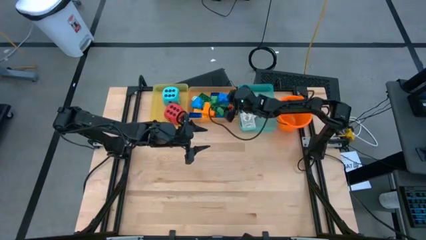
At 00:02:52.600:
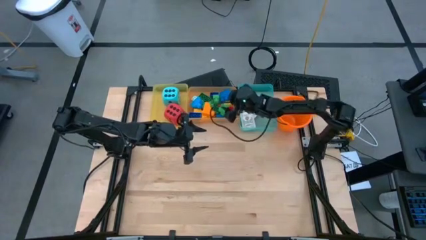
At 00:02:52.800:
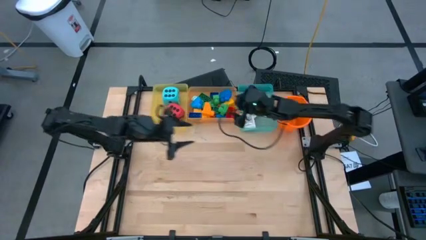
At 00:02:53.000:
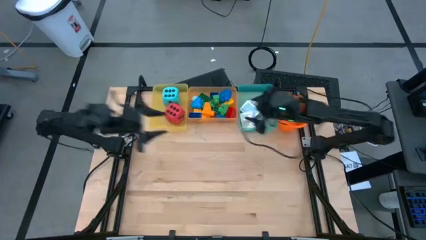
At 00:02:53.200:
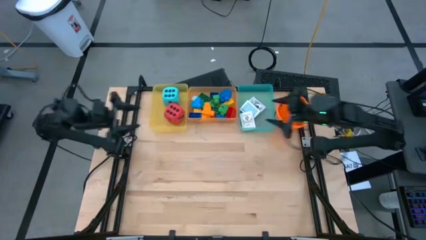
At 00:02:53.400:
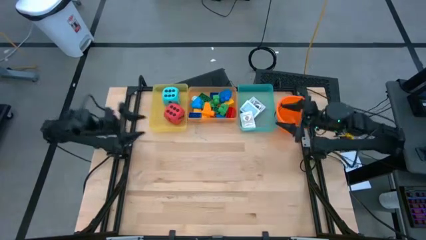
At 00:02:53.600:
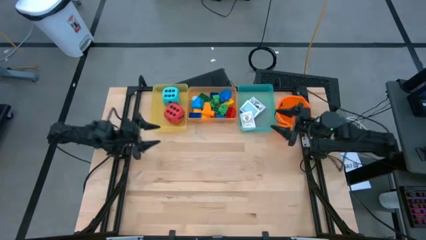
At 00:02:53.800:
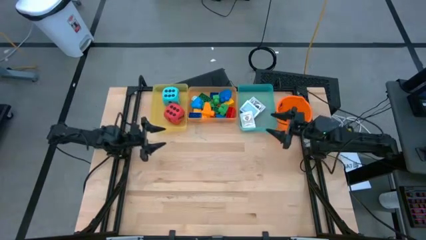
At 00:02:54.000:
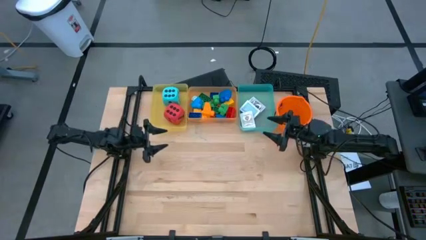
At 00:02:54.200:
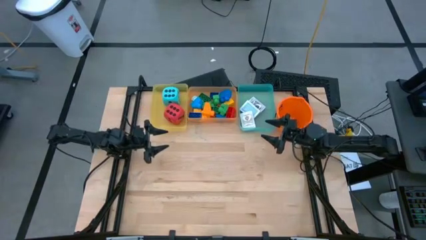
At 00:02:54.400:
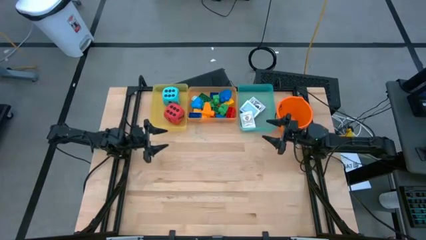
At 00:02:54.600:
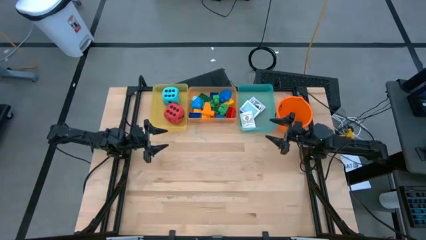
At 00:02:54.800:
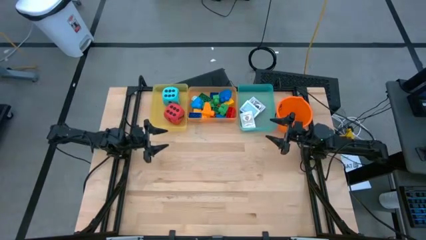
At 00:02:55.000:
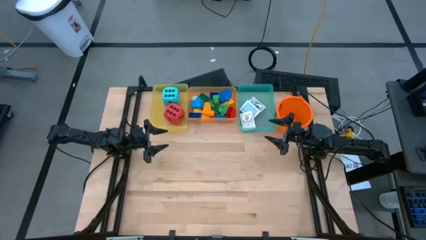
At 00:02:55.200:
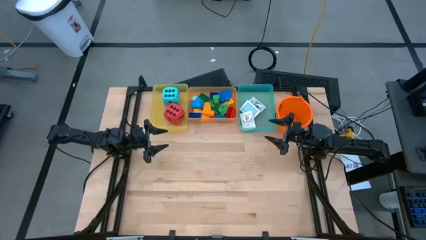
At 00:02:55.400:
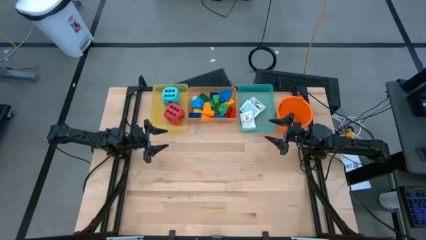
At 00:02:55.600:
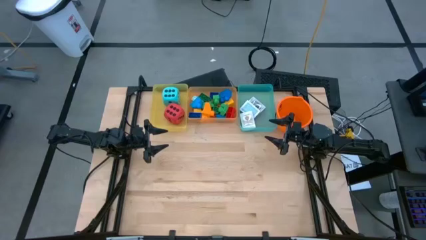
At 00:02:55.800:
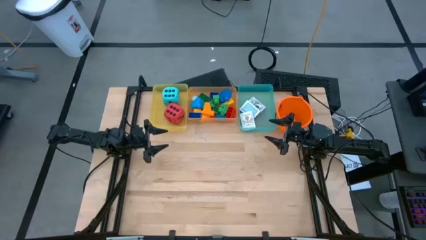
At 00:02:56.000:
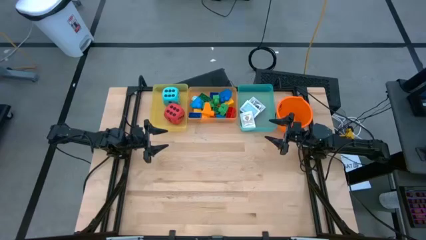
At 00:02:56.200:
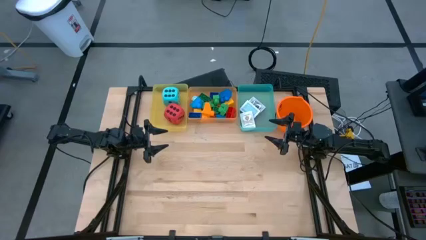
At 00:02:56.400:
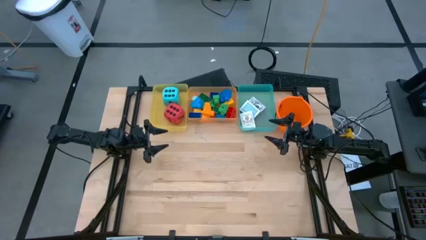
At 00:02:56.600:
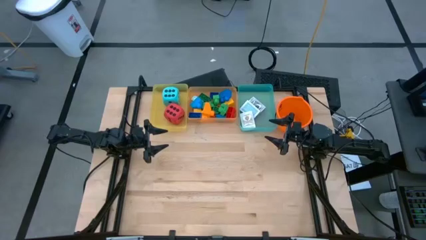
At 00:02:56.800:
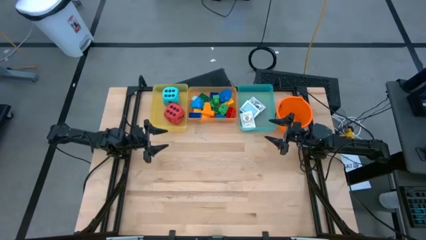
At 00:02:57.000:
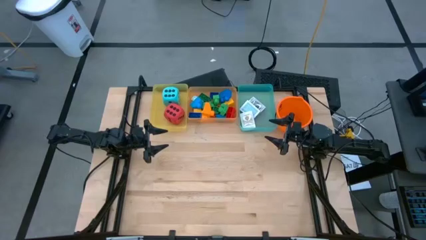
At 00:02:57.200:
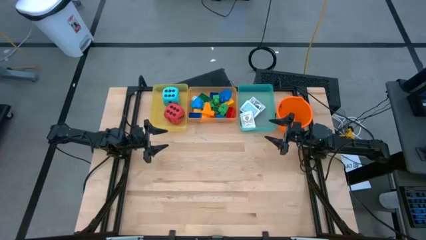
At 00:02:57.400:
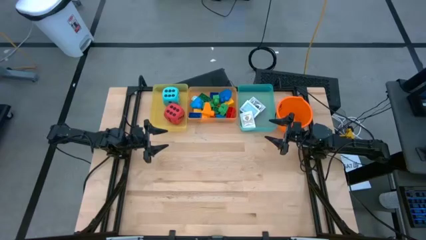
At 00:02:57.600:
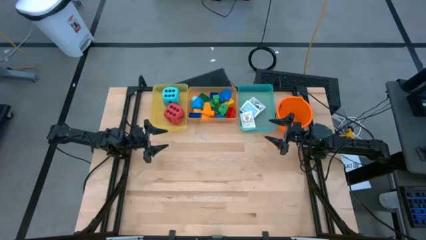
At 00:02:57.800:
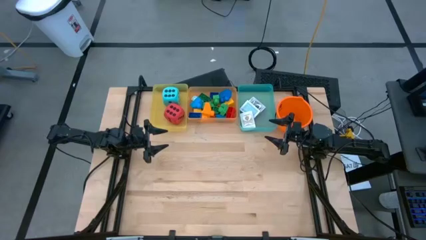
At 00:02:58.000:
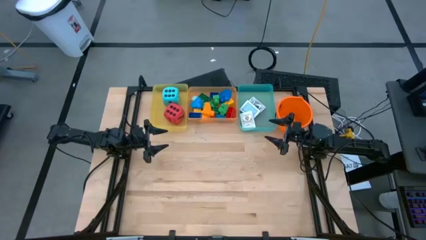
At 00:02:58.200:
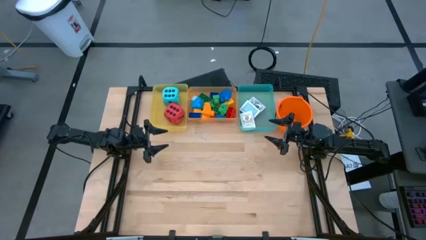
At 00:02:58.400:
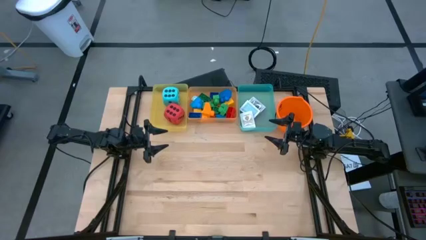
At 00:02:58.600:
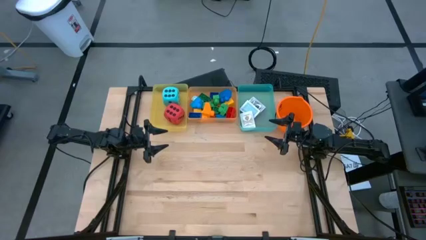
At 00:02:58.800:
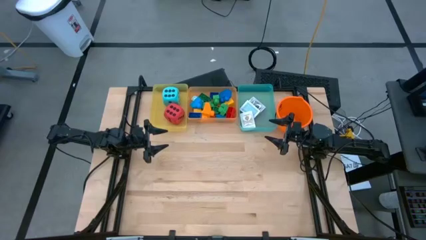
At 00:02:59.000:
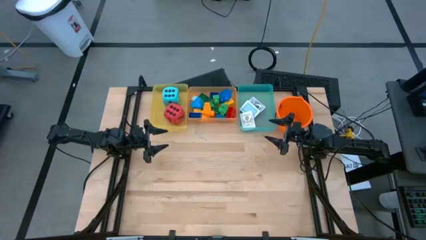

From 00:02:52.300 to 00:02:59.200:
Task: Pick & Place Toys
Return to Home Position

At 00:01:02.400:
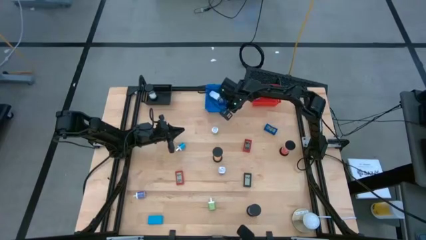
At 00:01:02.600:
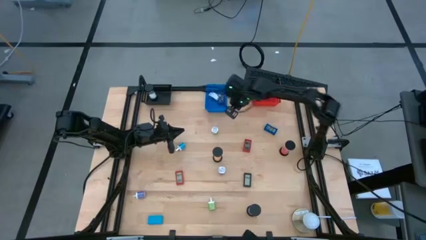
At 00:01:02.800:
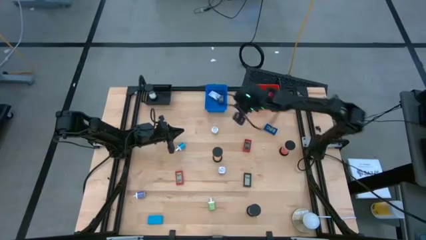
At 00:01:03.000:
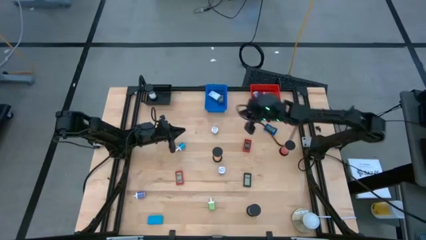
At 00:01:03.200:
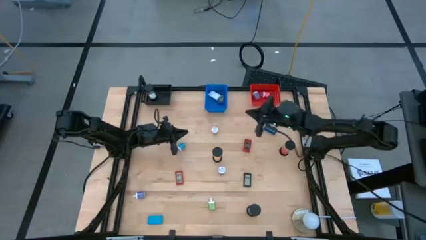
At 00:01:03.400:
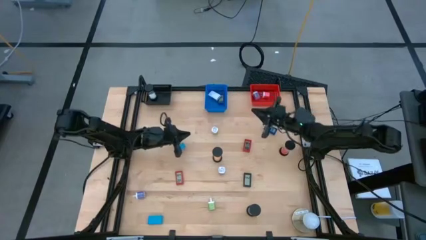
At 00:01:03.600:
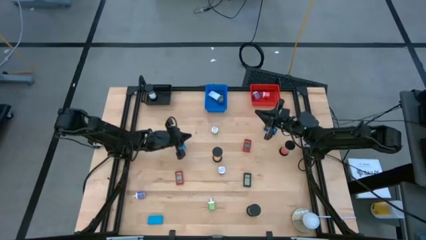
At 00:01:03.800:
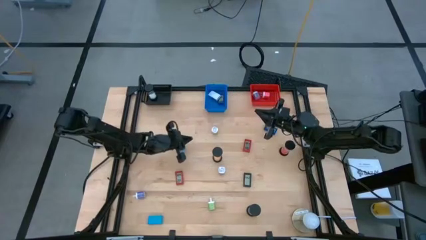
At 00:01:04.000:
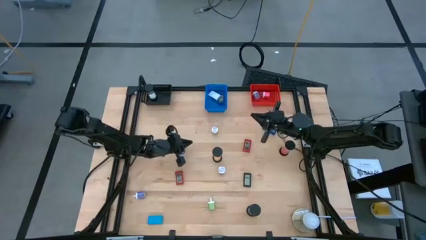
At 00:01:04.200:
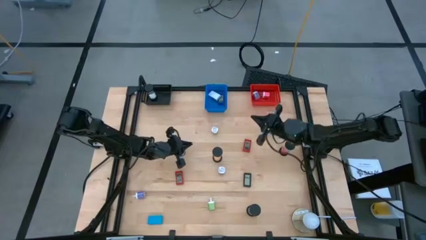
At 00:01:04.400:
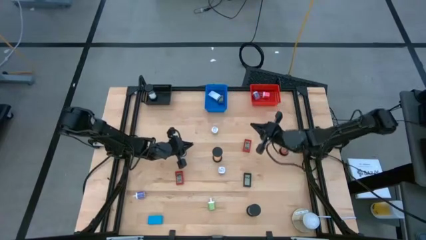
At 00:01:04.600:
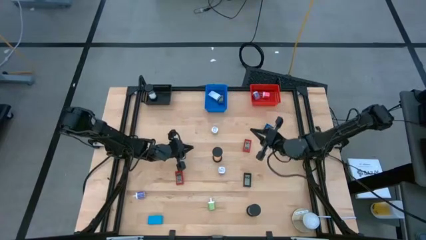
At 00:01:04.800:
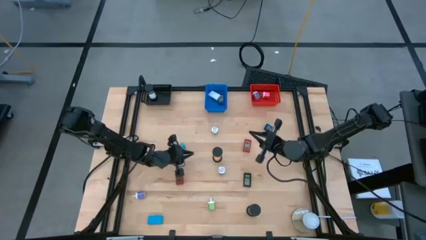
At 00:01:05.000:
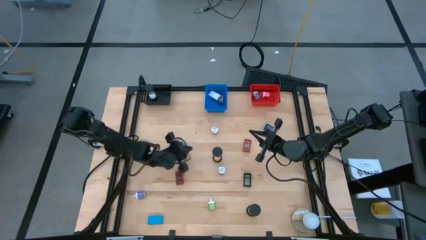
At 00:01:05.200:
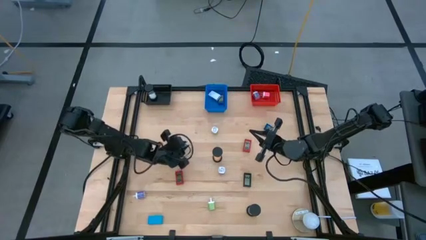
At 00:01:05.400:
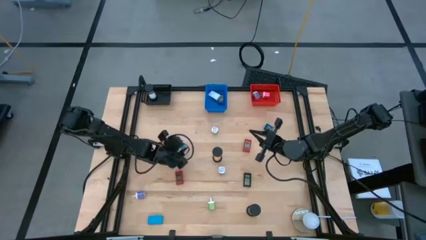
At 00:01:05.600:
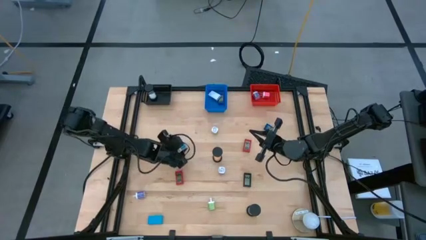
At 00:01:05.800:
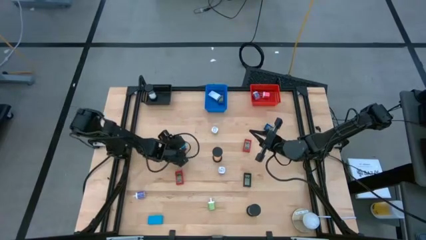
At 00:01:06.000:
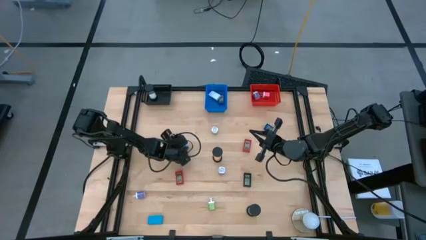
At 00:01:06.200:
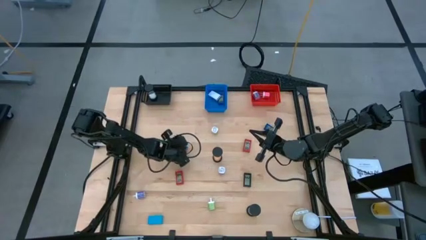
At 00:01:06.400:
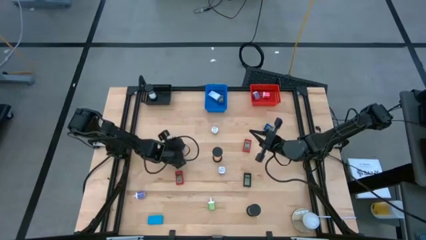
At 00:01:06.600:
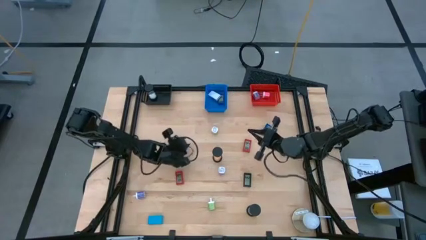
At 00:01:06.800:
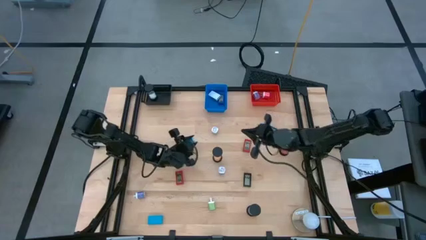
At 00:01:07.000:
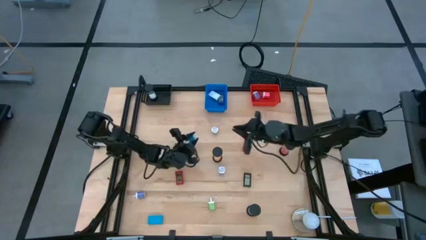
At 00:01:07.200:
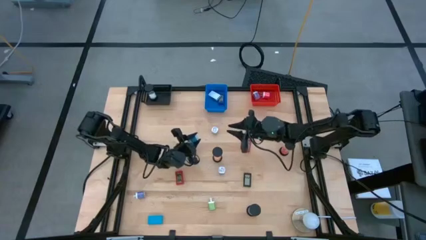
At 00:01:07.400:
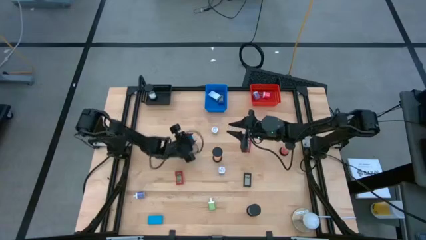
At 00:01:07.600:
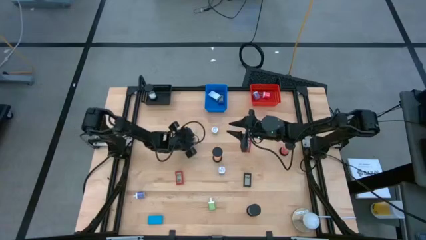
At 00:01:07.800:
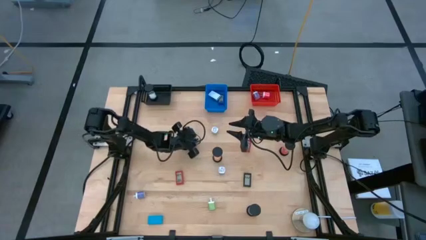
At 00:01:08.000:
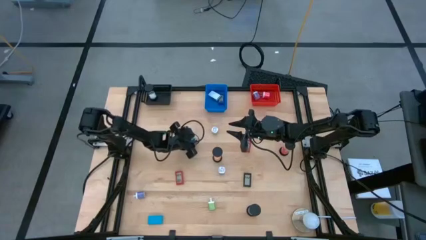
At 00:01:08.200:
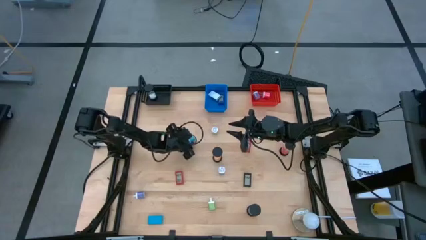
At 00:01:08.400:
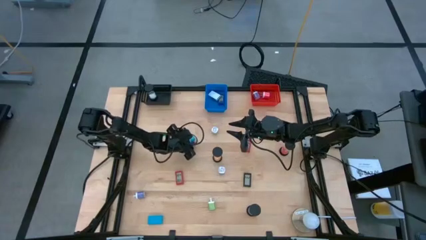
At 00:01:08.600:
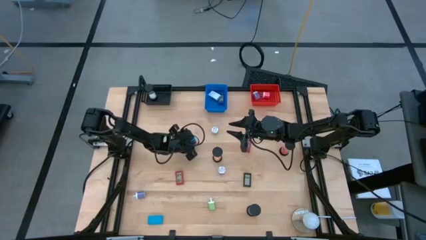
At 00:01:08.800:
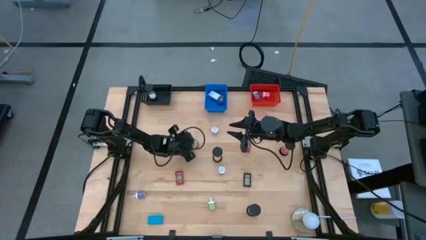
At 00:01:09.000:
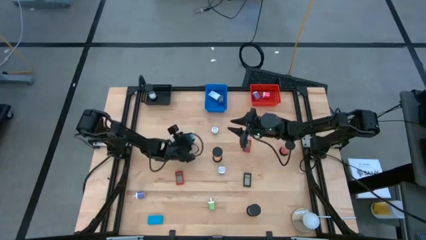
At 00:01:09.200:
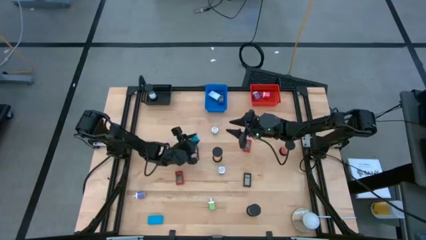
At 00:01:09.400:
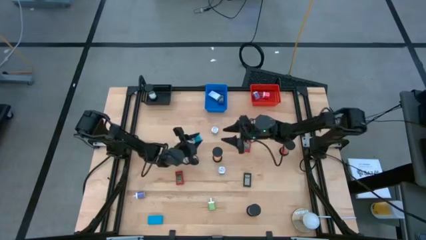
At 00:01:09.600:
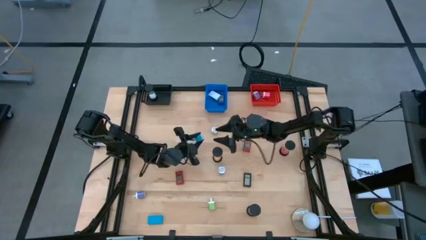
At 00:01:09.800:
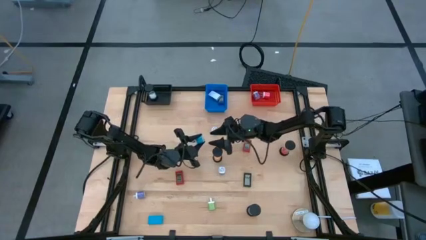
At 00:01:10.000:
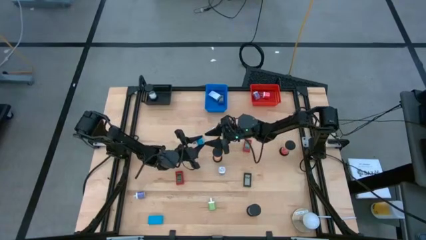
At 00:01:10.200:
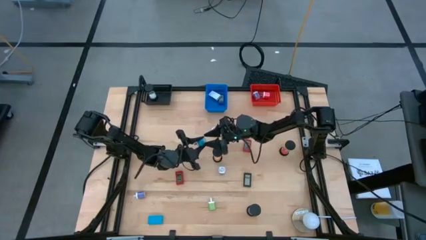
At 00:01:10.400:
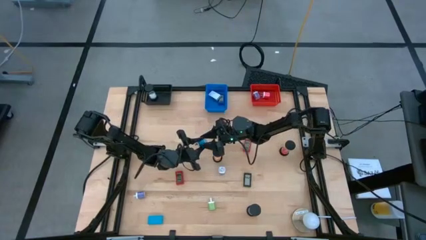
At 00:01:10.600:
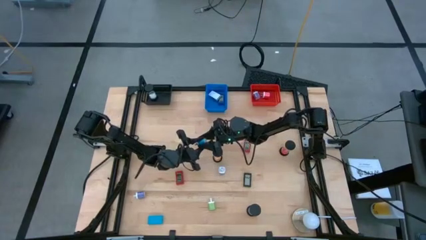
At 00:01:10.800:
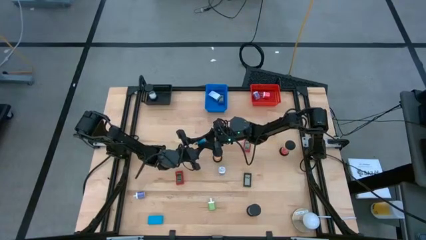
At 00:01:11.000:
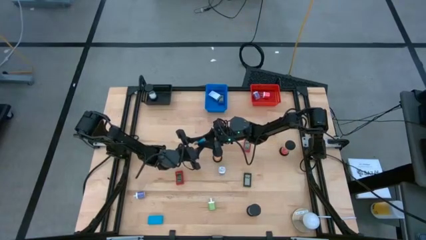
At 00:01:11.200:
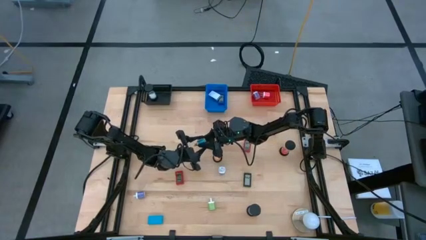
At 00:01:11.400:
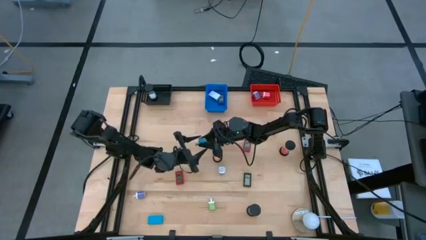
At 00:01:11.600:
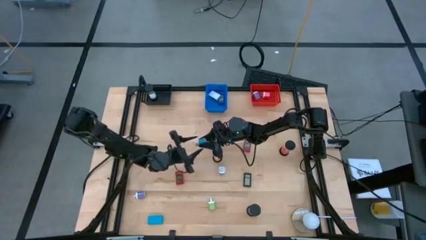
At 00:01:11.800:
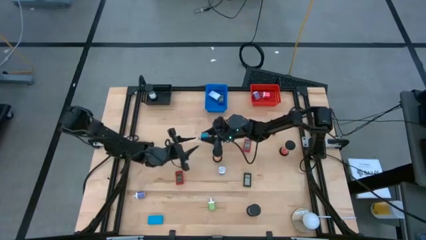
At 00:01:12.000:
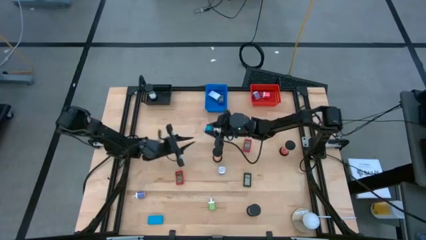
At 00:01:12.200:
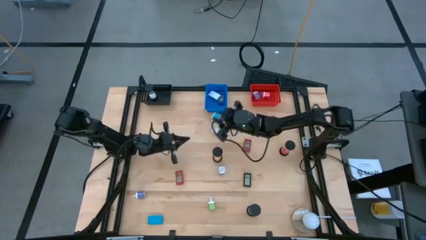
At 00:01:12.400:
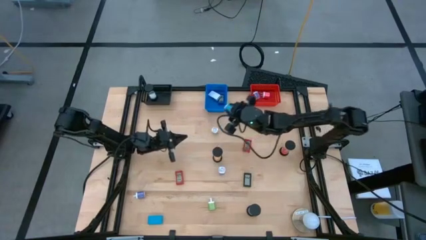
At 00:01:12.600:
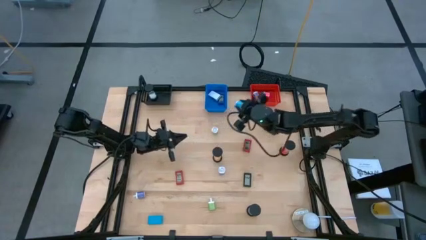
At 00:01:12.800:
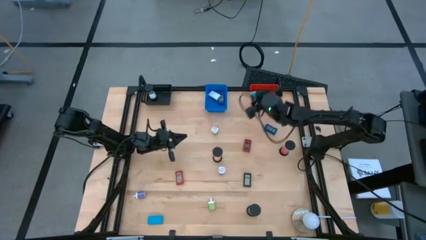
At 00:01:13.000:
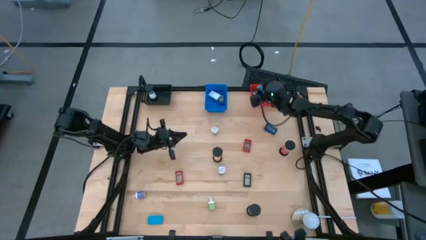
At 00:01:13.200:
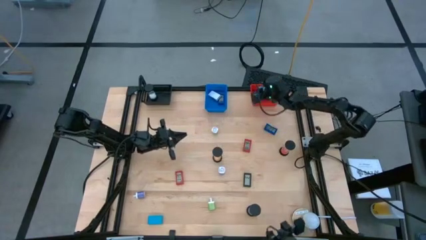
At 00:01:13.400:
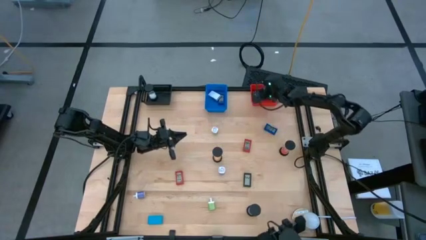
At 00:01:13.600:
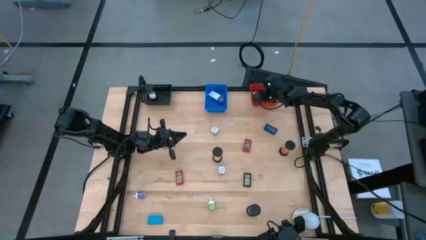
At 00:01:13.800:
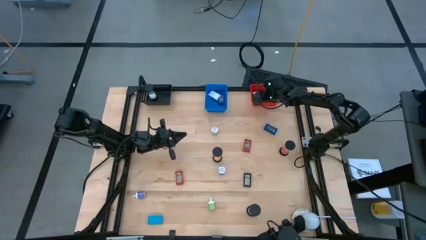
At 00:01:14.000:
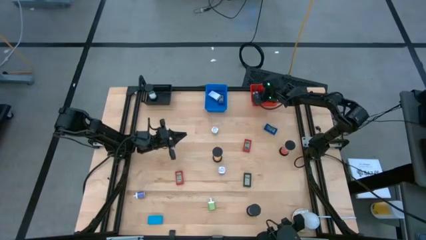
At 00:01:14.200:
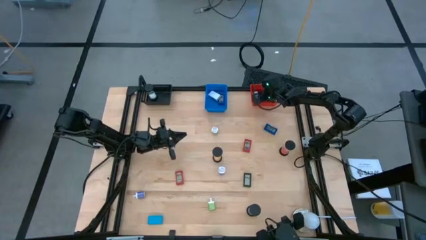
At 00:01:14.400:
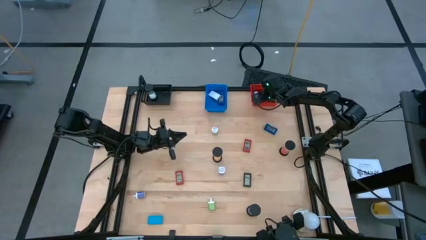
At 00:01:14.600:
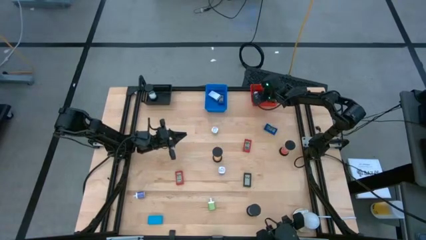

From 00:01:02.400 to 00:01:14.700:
Task: Pick & Place Office items
Put the blue charger adapter into the red basket
